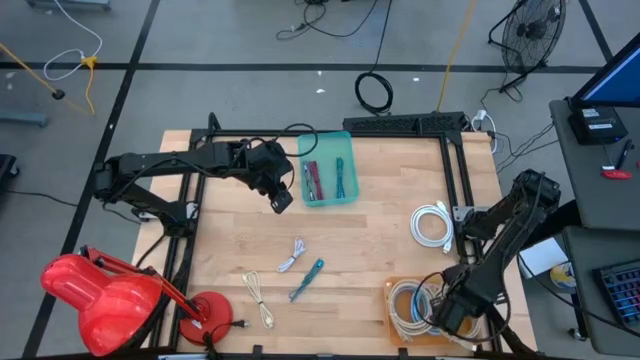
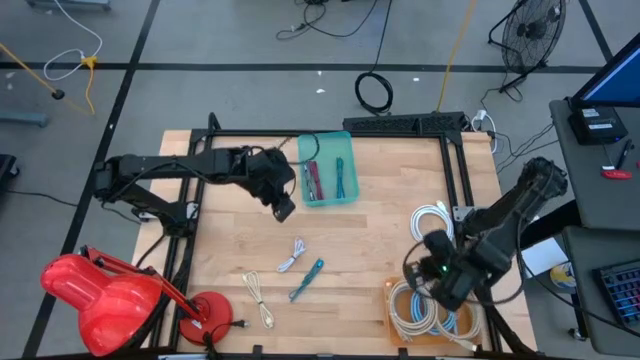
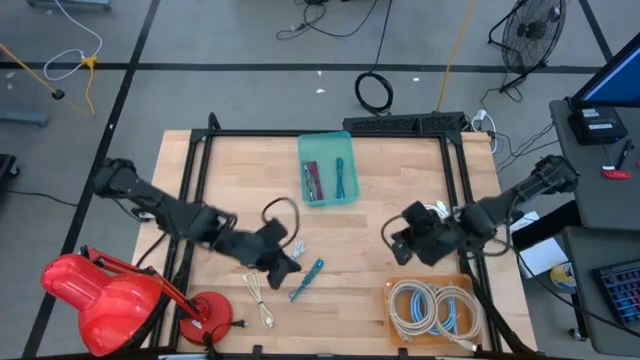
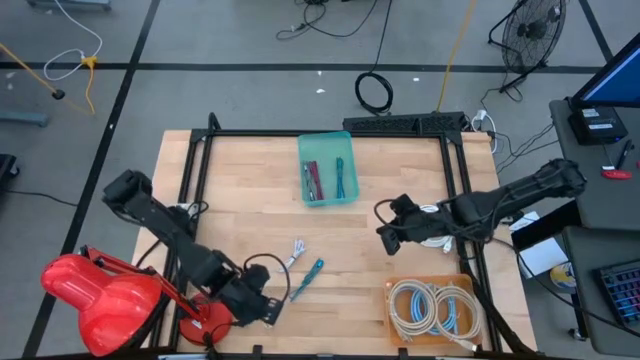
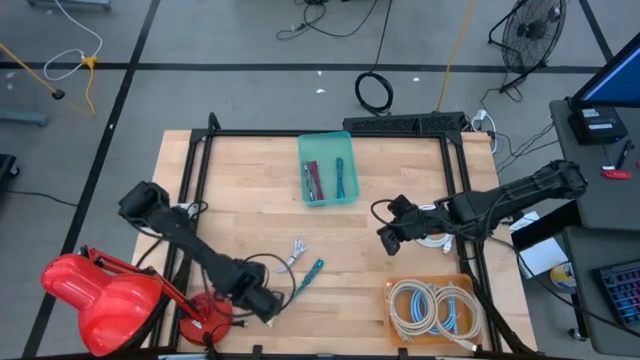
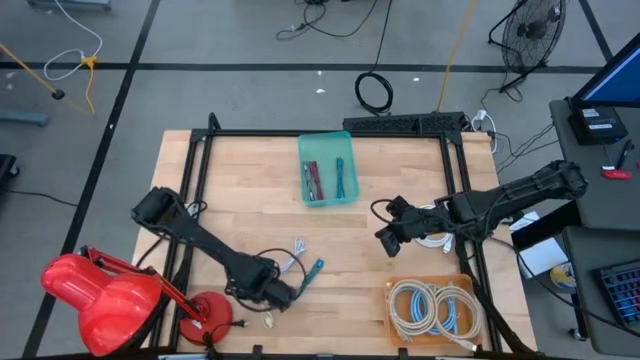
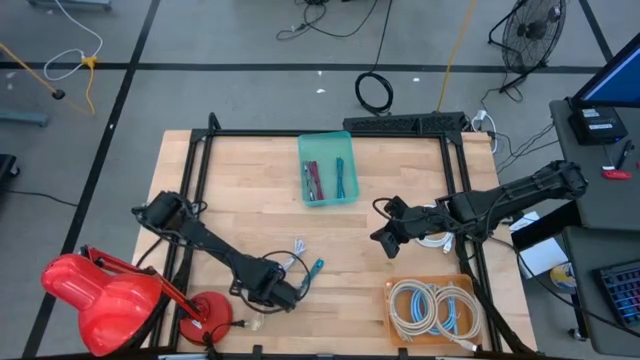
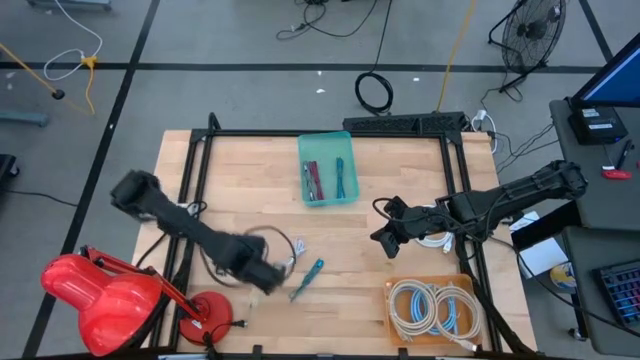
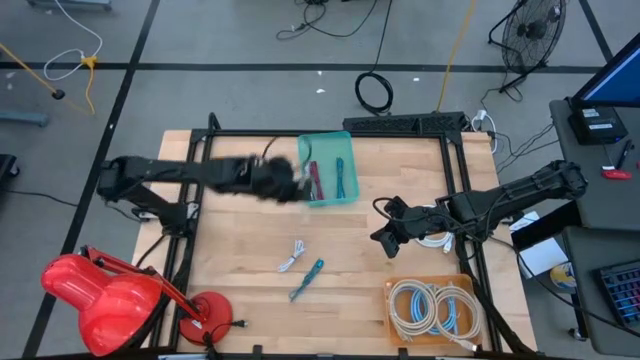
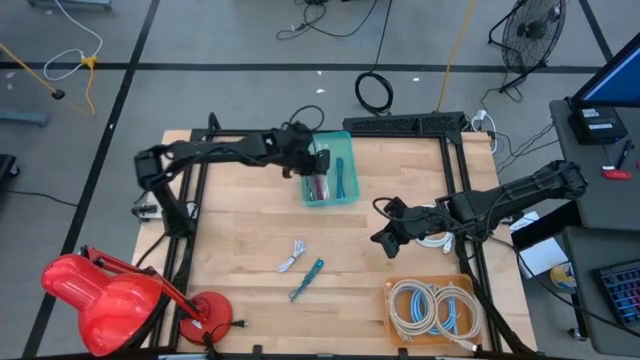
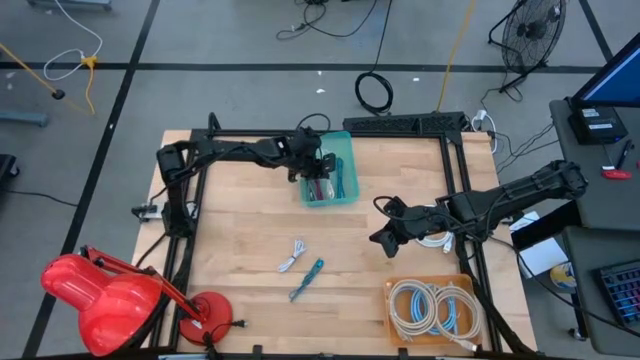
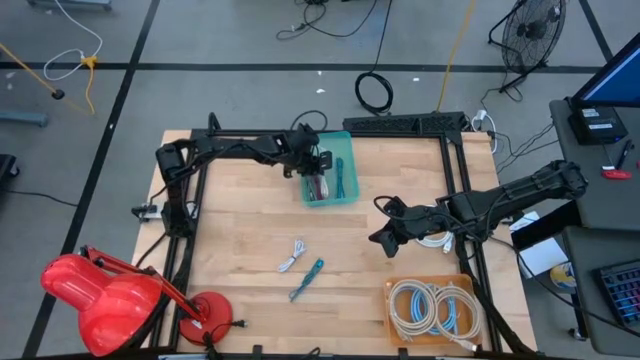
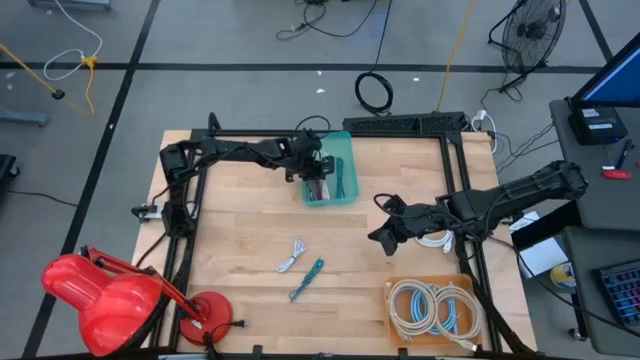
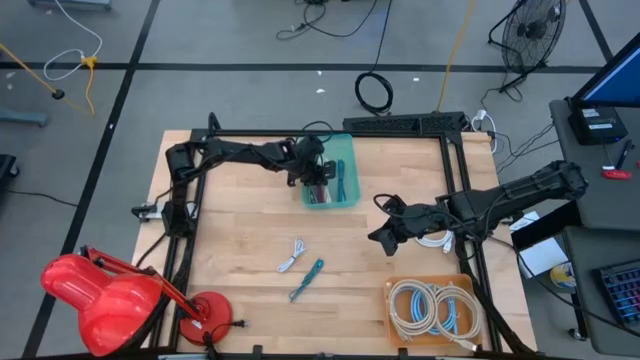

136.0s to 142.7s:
Task: Pick & Place USB Port
Put the white charger cable into the blue bin

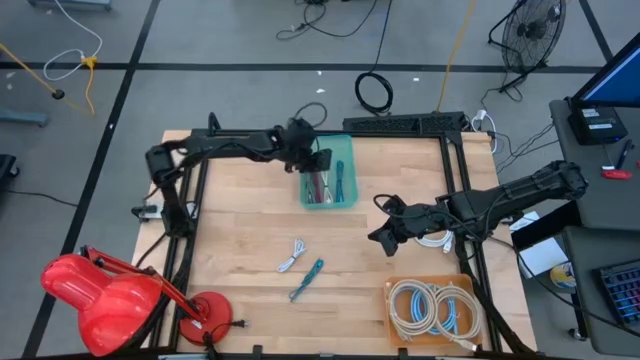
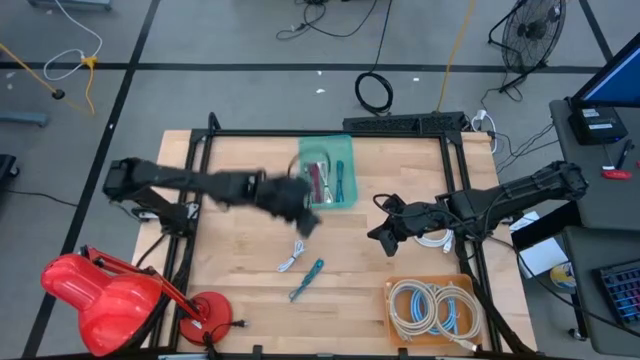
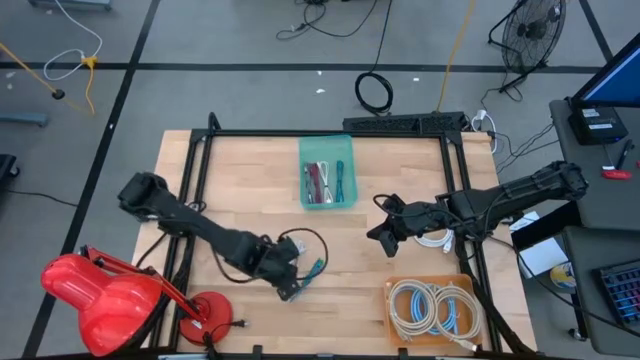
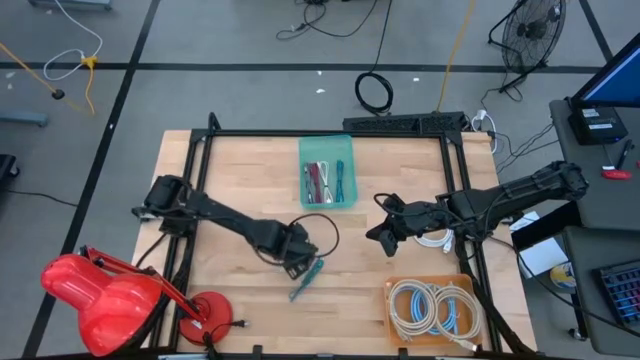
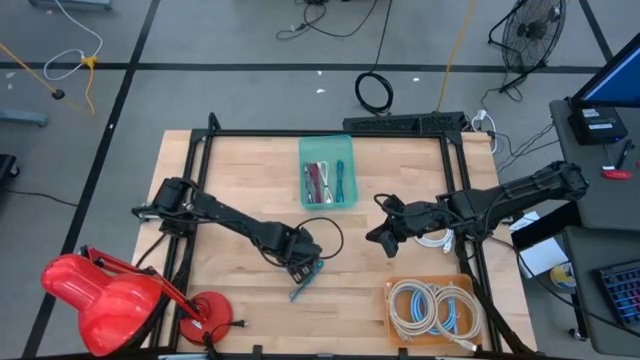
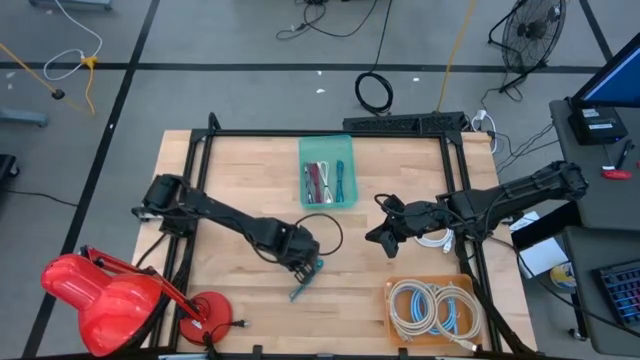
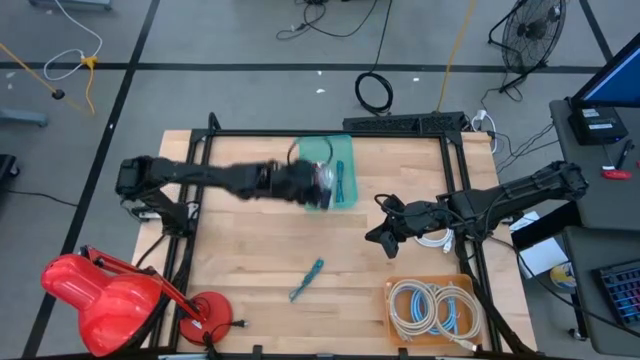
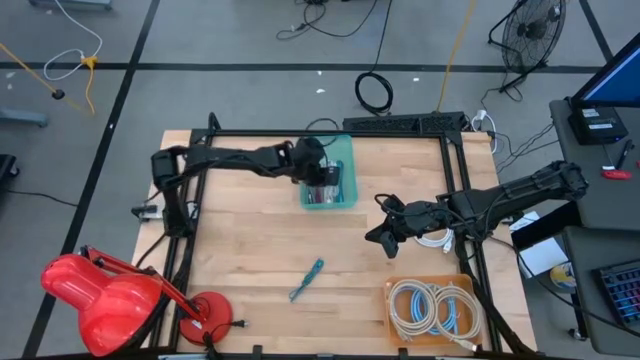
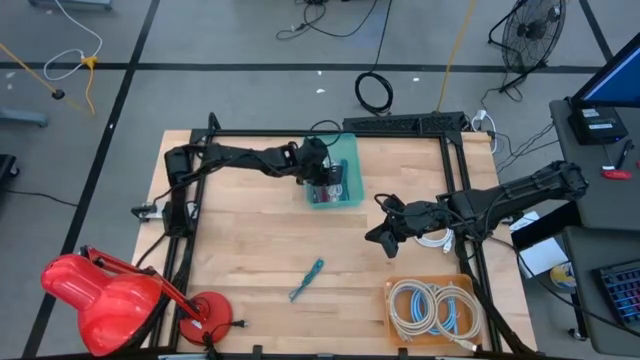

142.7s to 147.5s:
Put the left white charger cable into the blue bin

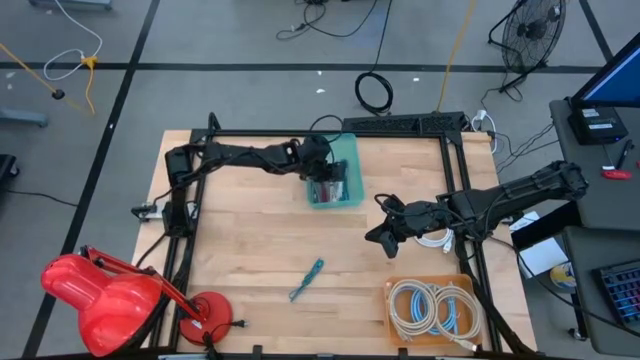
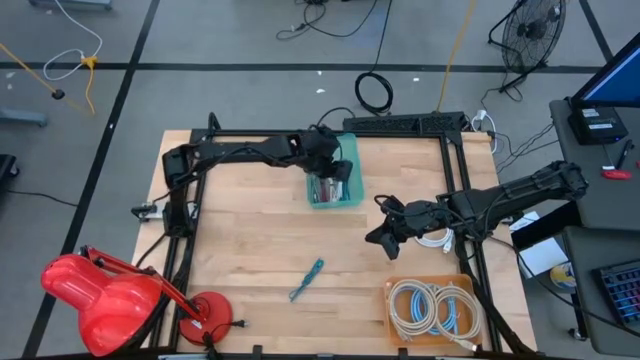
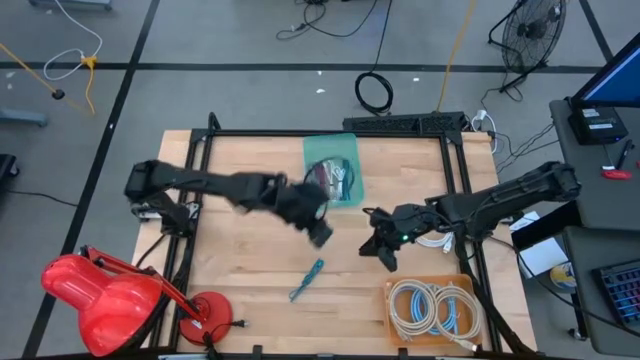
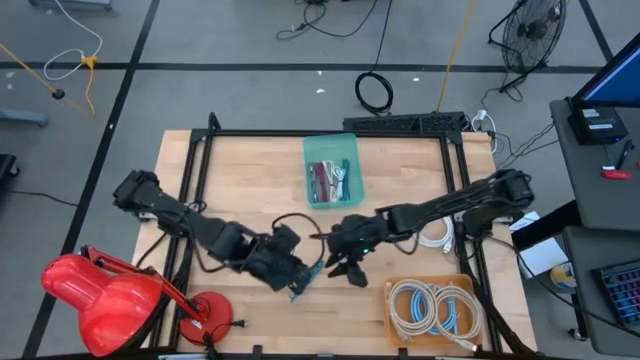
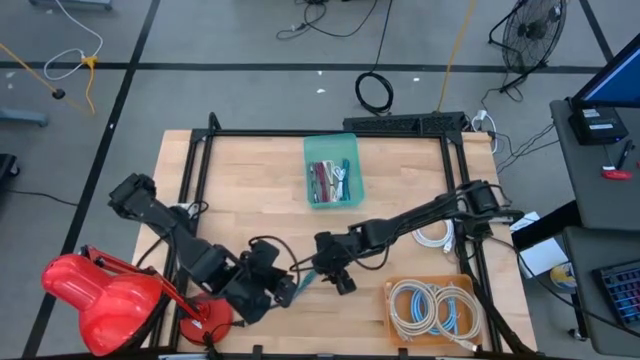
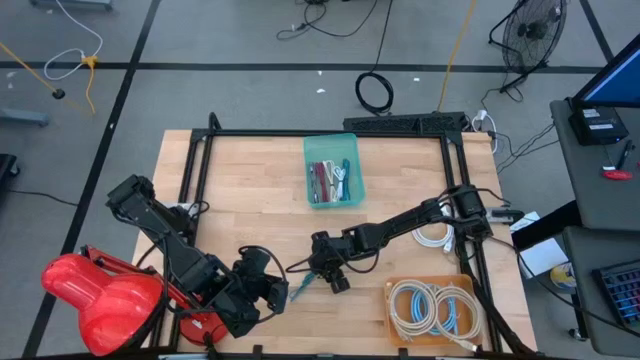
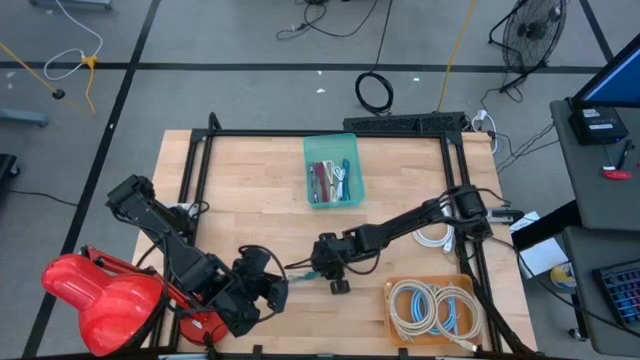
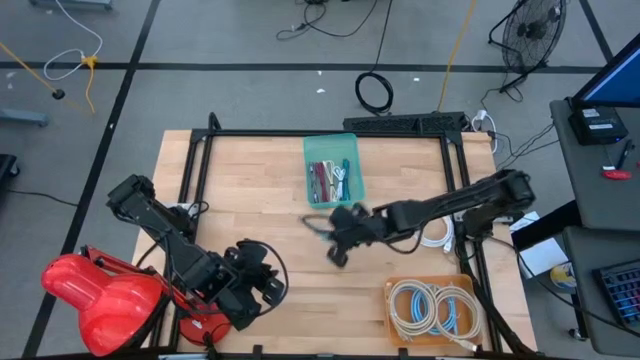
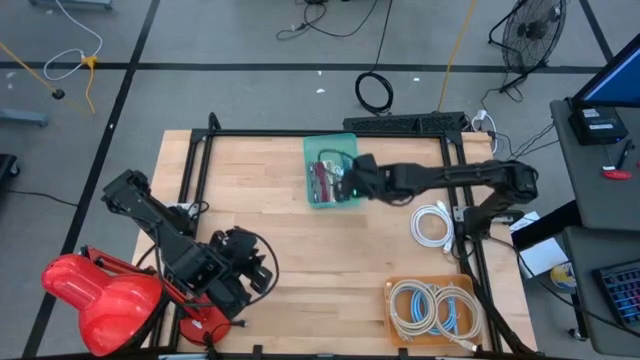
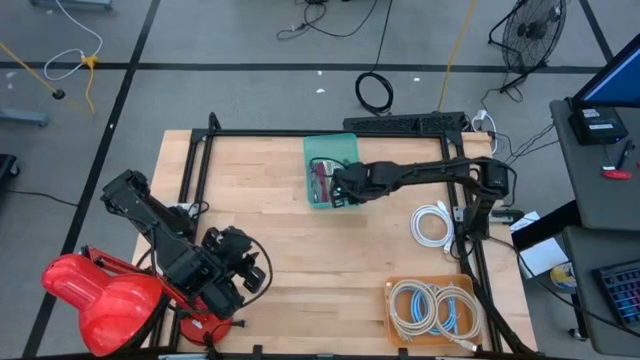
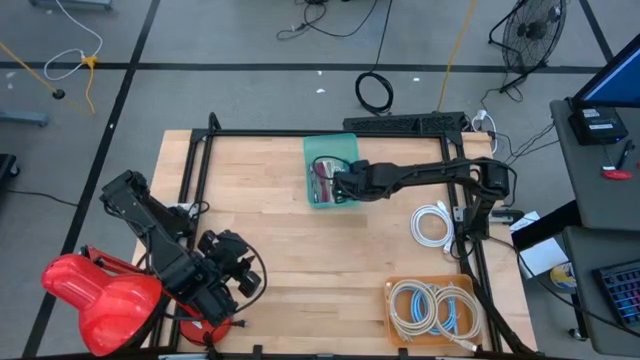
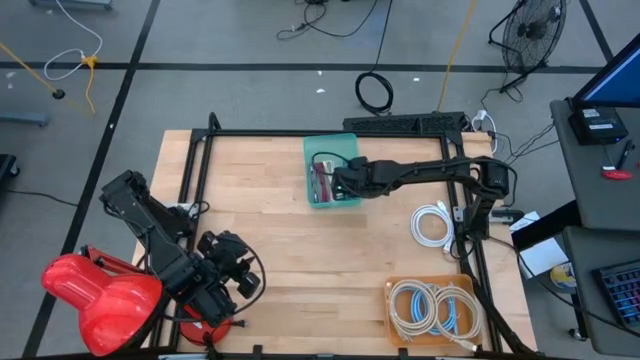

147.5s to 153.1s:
Put the blue charger cable into the blue bin

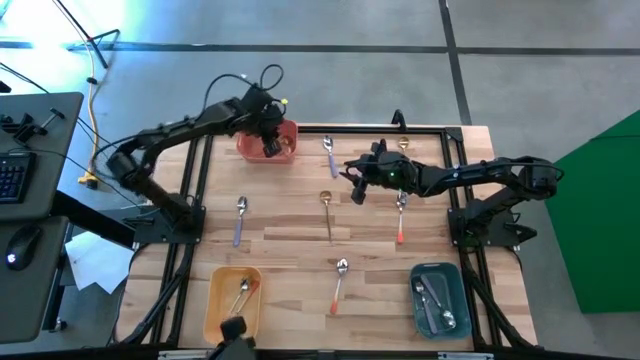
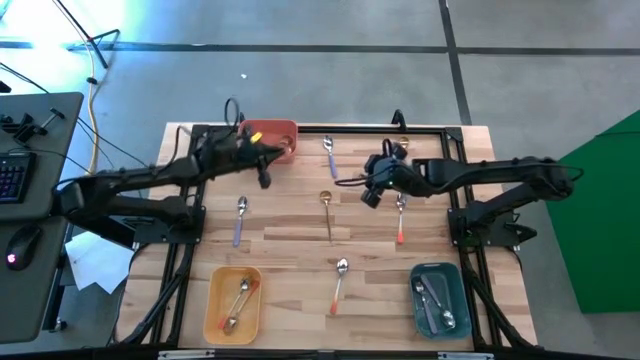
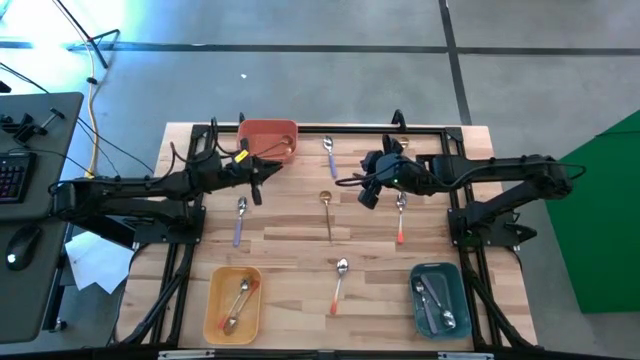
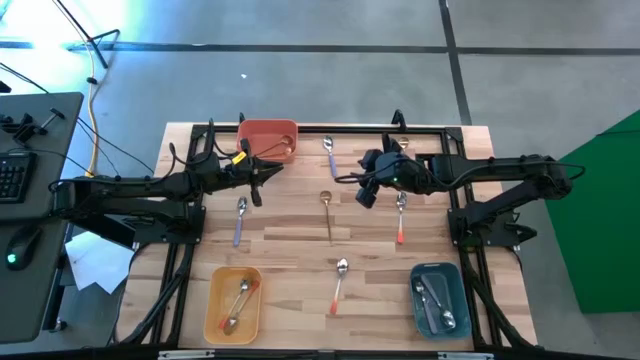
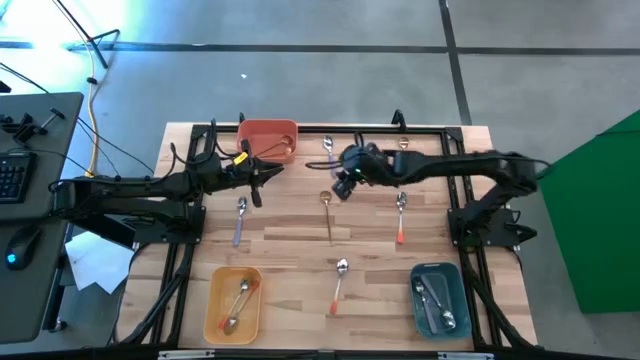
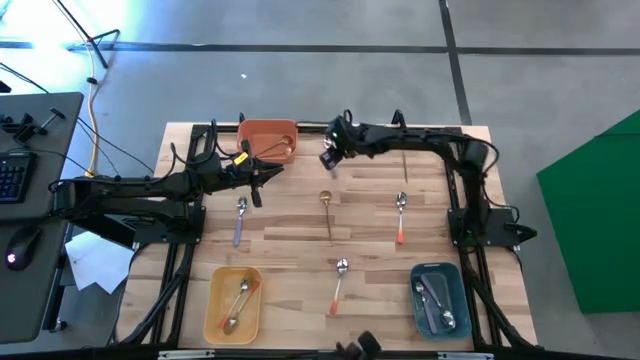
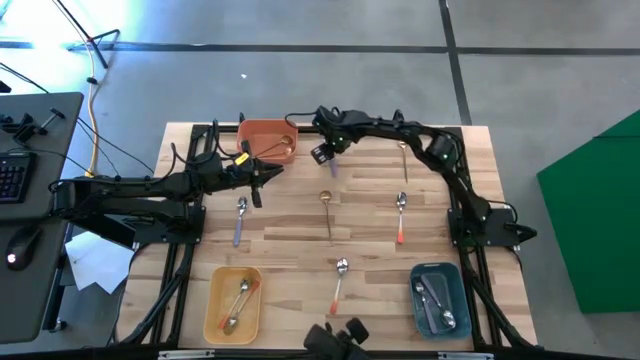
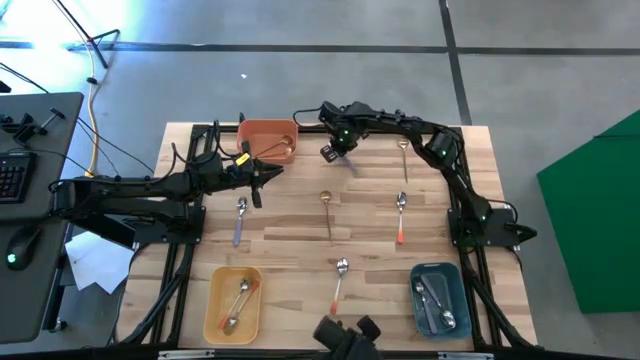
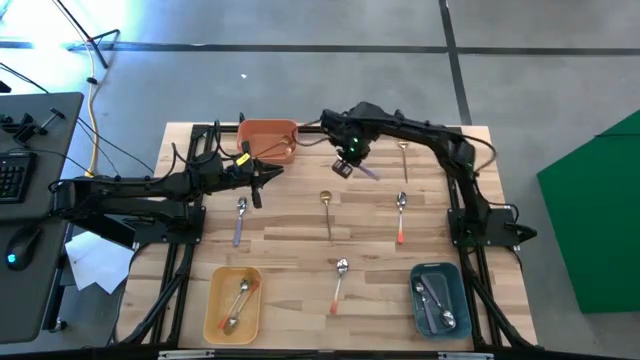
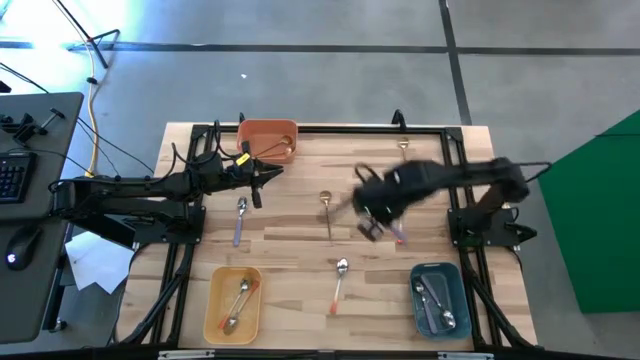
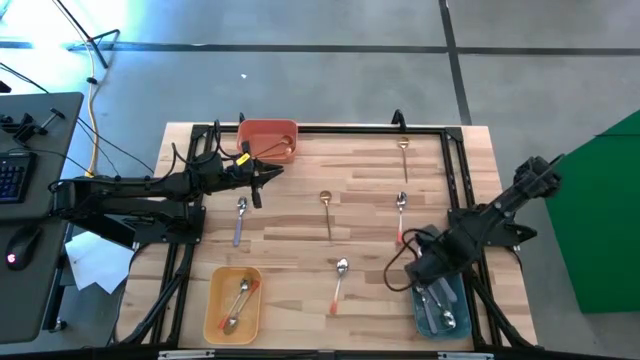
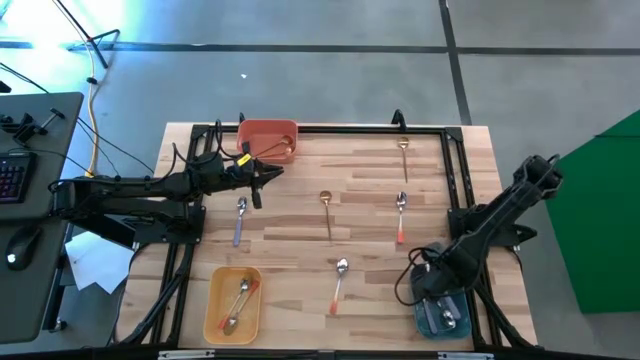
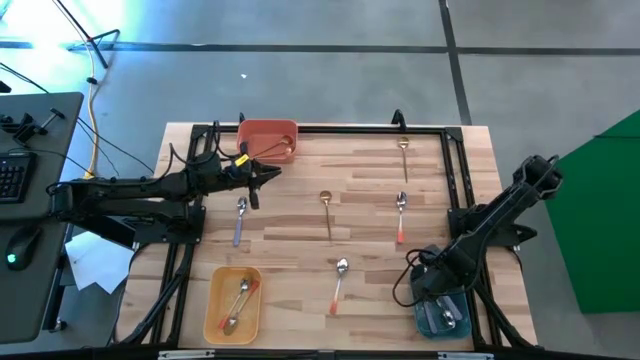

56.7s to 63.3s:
Task: Sort silverware by color (type)
Put the top purple spoon into the green bin
